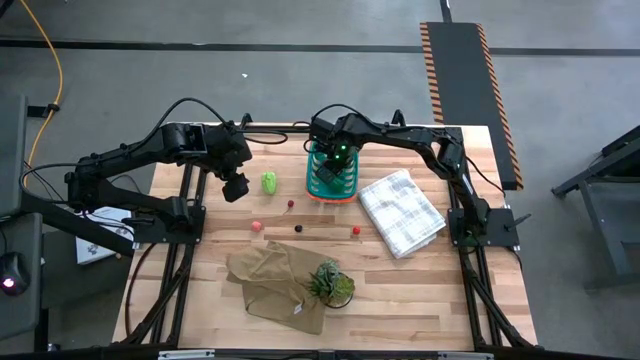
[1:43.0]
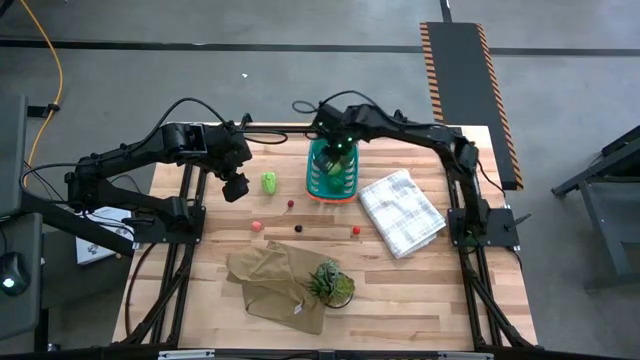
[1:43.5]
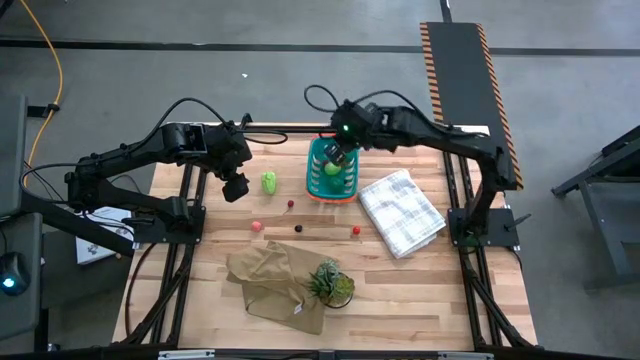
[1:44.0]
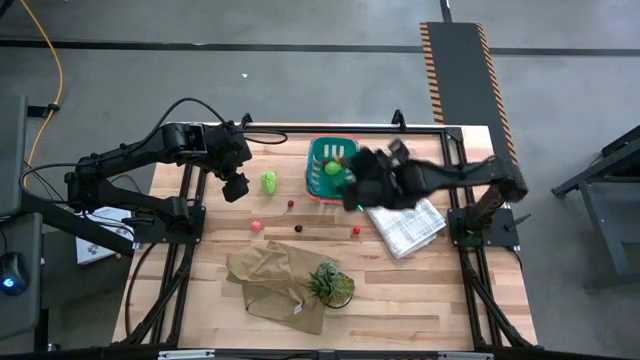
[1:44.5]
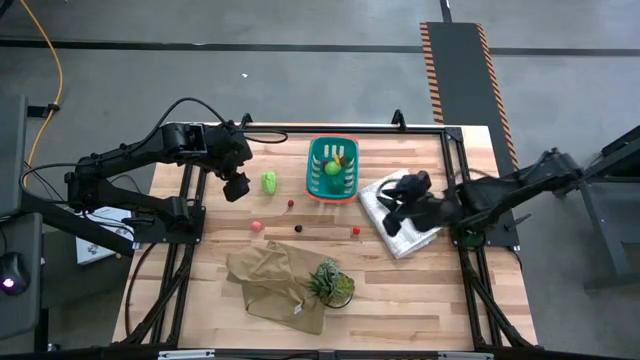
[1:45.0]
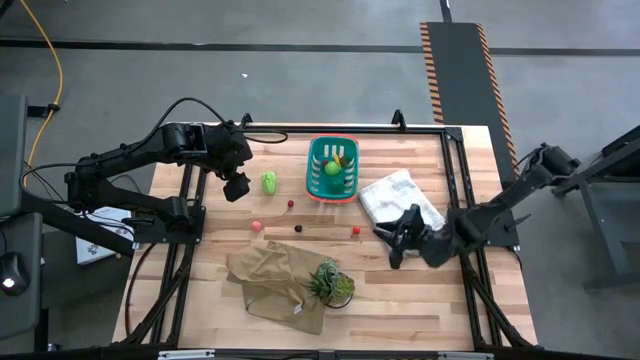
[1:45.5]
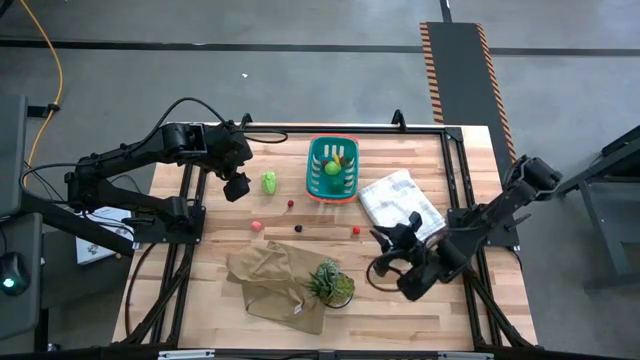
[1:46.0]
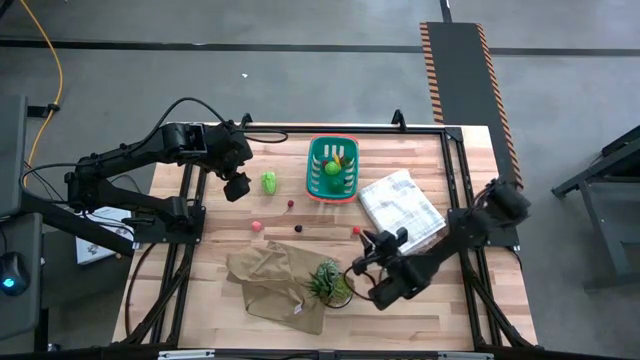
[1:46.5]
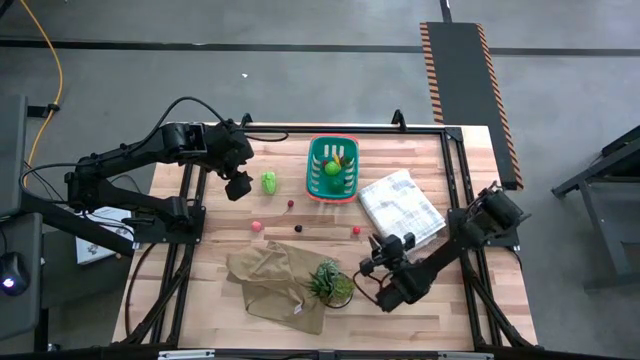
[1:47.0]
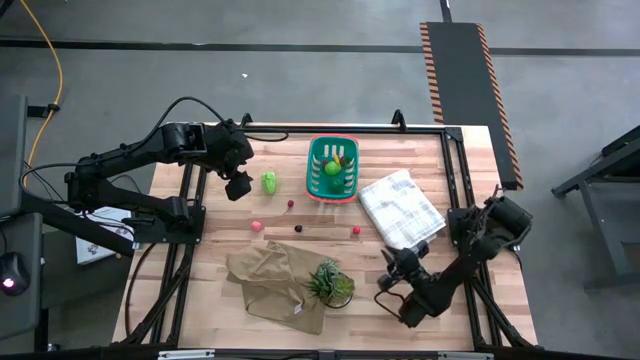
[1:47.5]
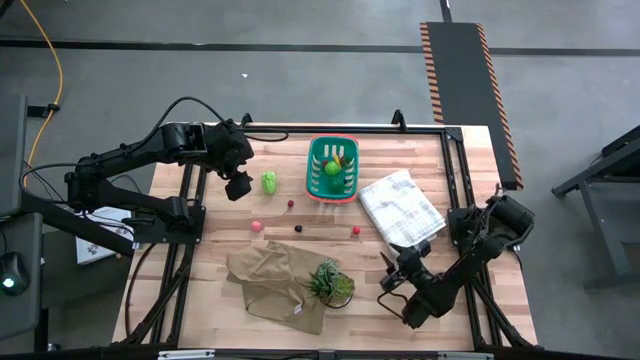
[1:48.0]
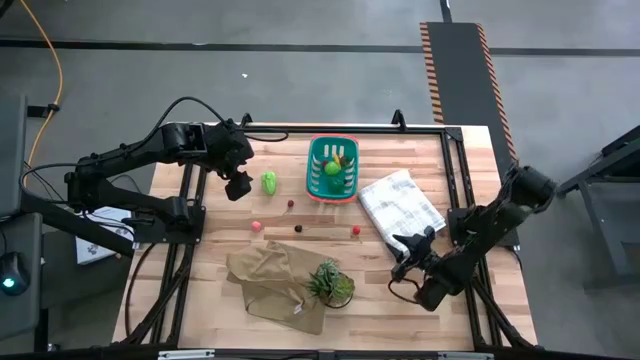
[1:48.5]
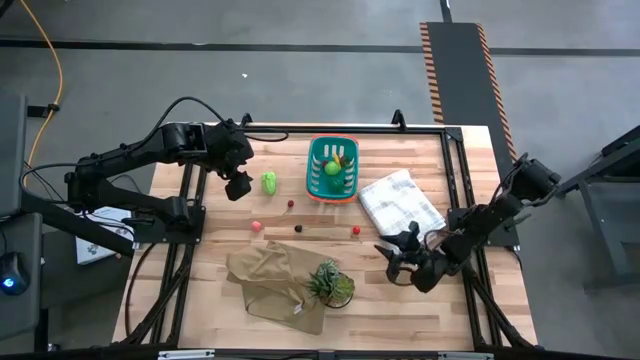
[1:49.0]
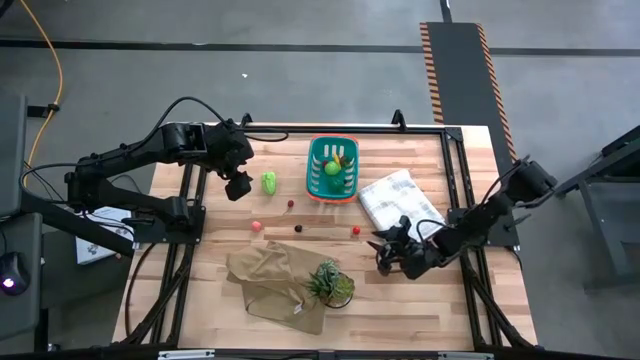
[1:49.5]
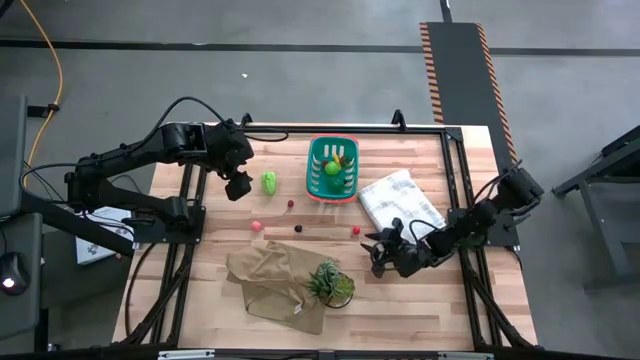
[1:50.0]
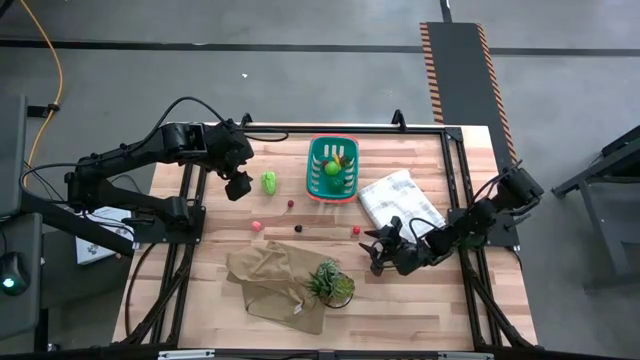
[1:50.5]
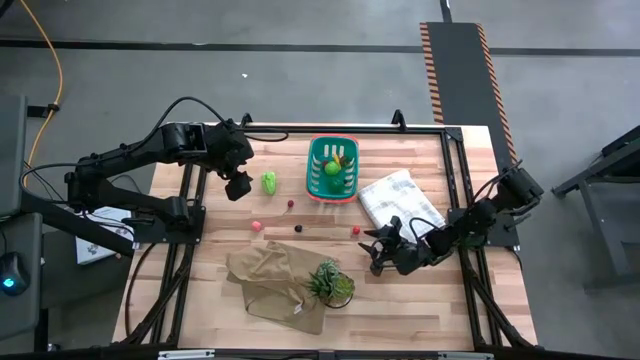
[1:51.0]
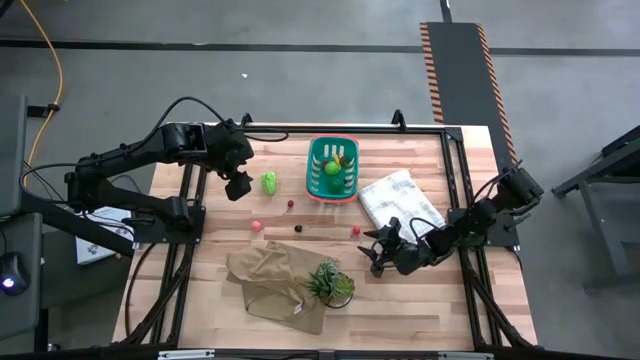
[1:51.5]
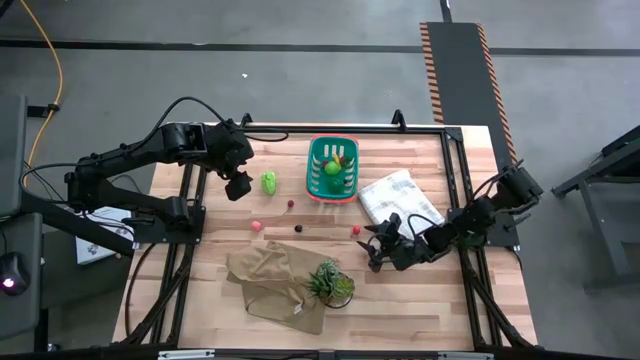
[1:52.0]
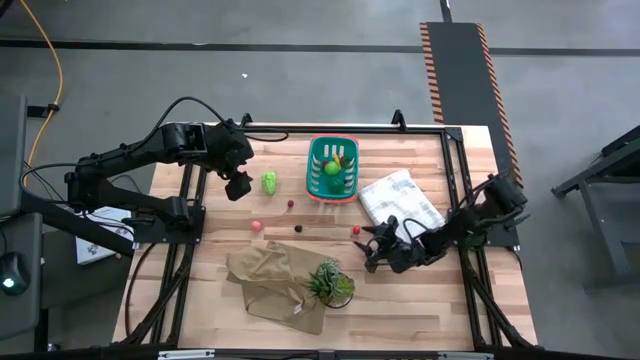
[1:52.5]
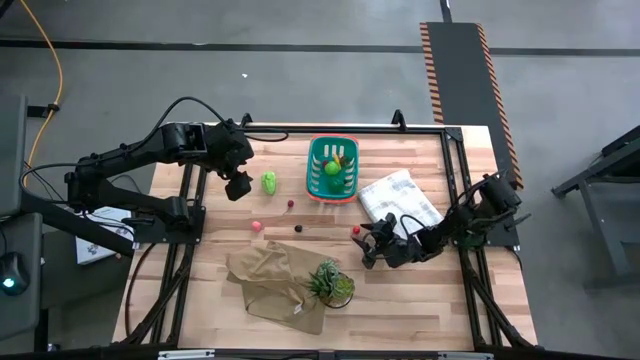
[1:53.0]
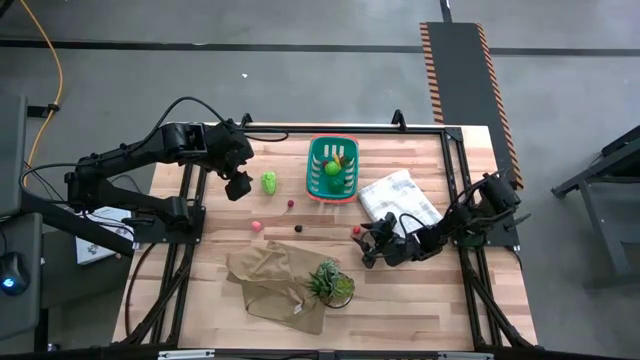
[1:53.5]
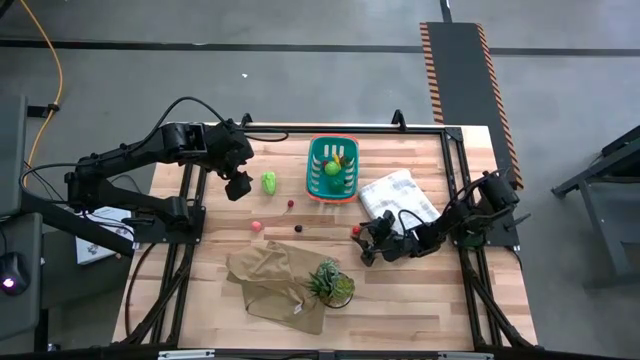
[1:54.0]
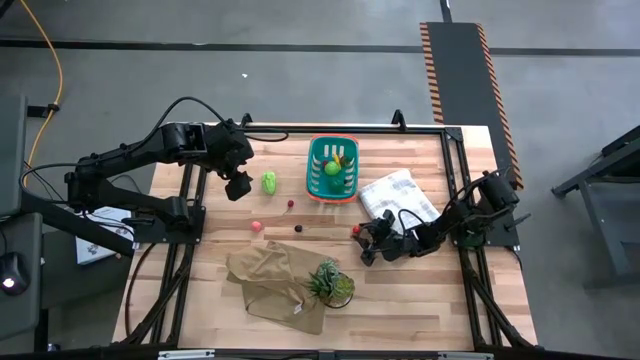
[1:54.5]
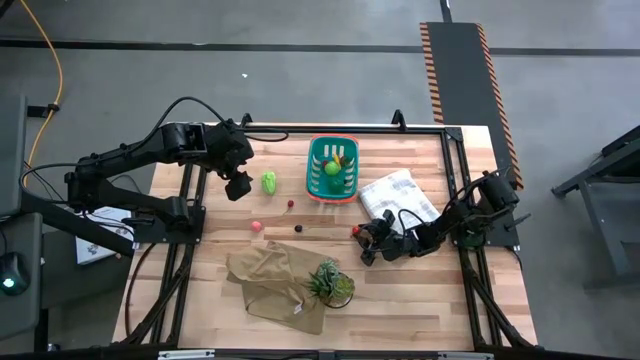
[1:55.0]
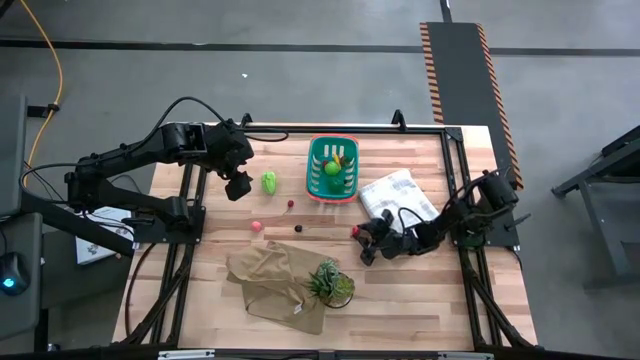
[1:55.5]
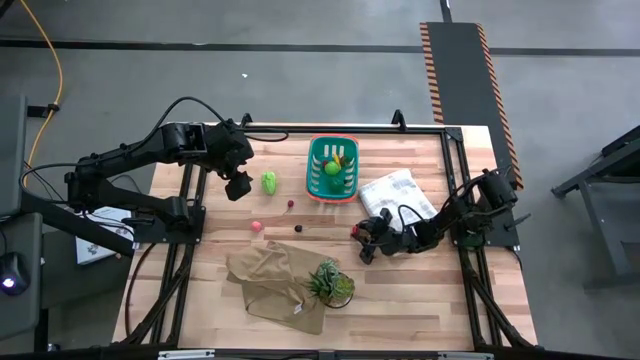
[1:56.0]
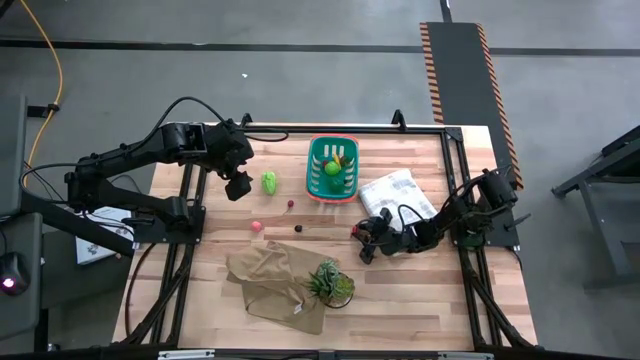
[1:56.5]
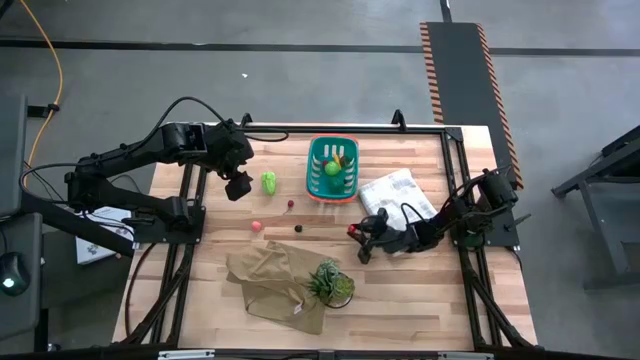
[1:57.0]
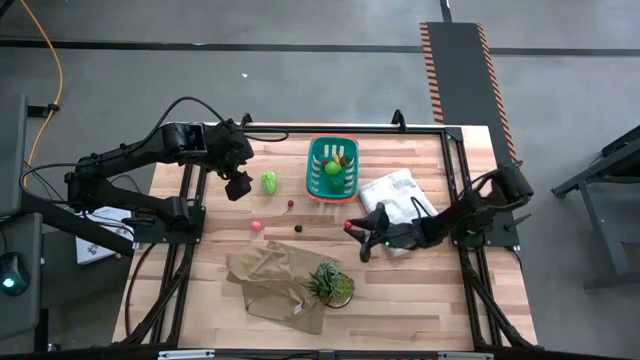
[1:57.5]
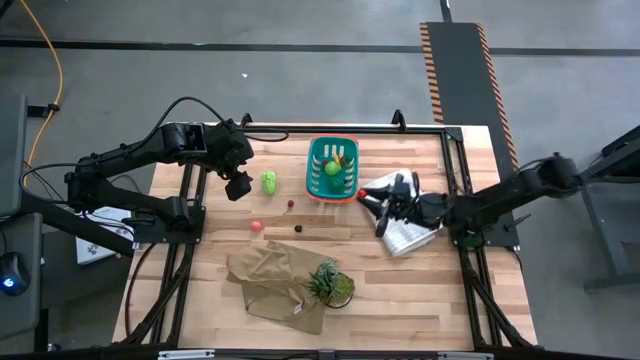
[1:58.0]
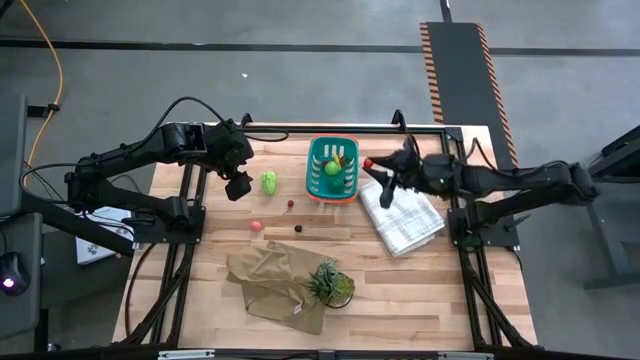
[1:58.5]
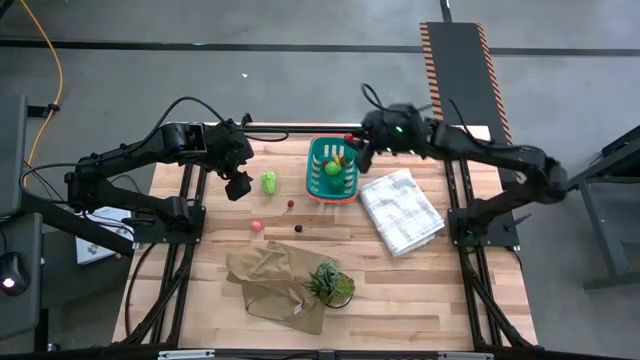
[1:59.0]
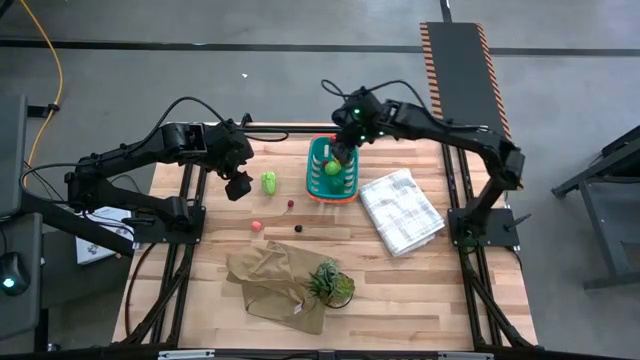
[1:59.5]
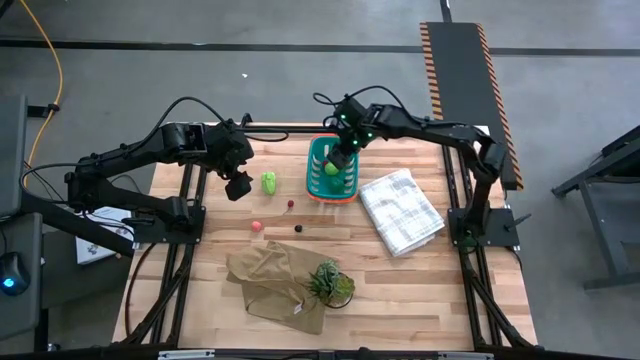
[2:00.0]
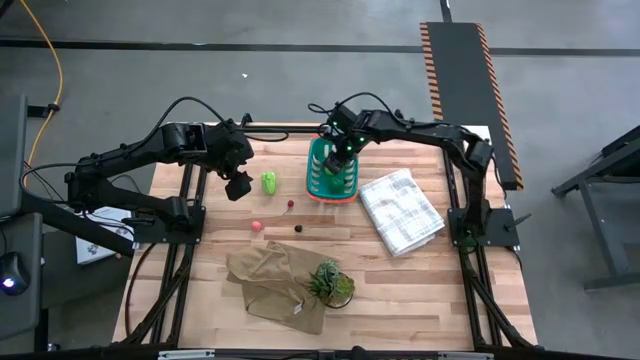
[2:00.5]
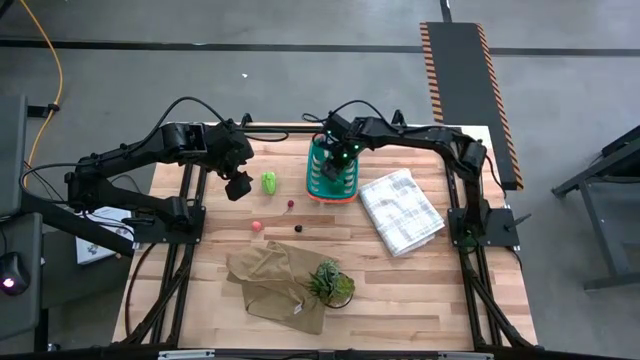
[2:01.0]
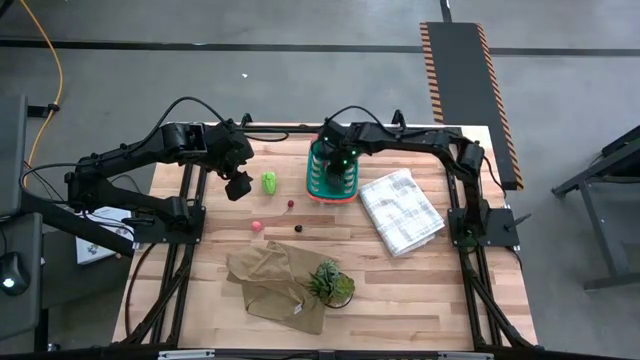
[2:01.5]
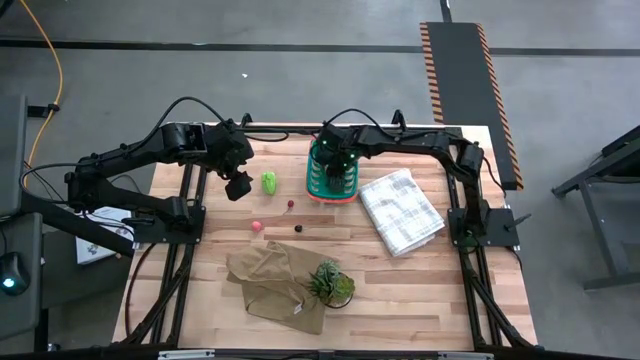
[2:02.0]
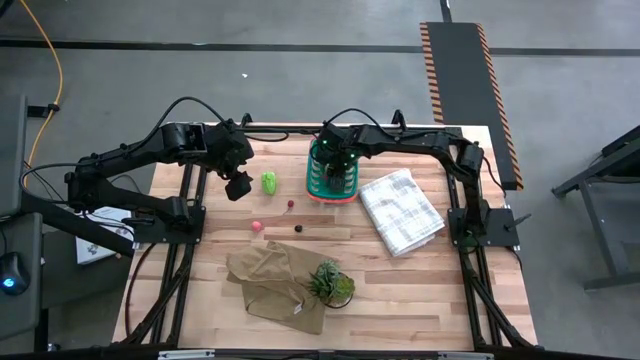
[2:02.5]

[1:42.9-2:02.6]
Task: Pick and placing Produce into tupperware
Put the red cherry into the green basket

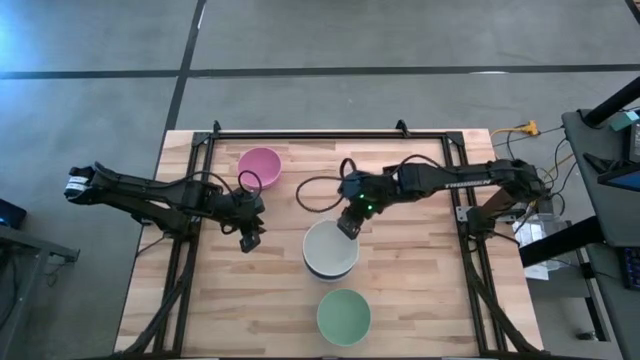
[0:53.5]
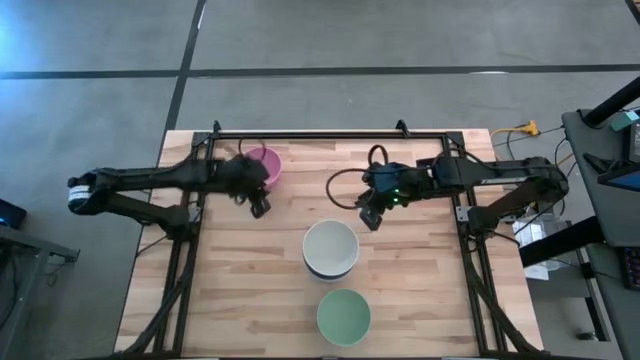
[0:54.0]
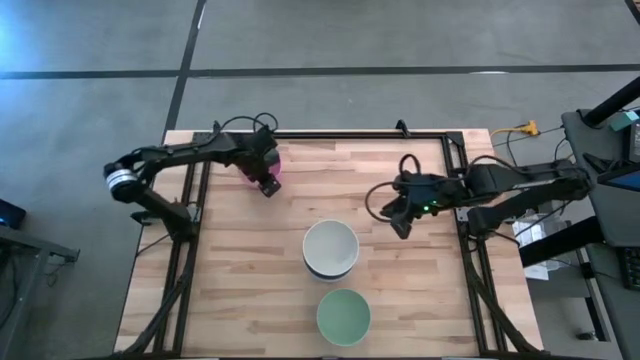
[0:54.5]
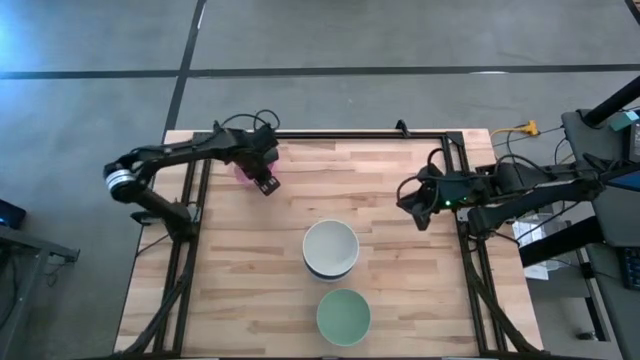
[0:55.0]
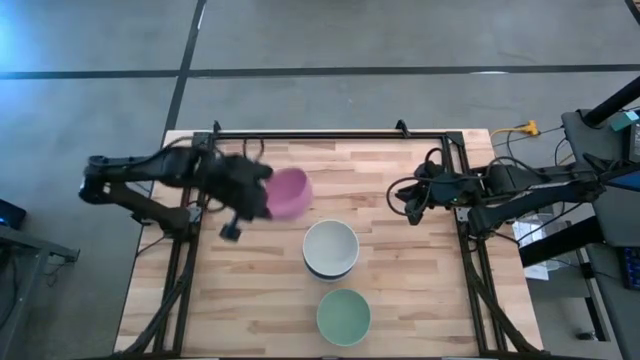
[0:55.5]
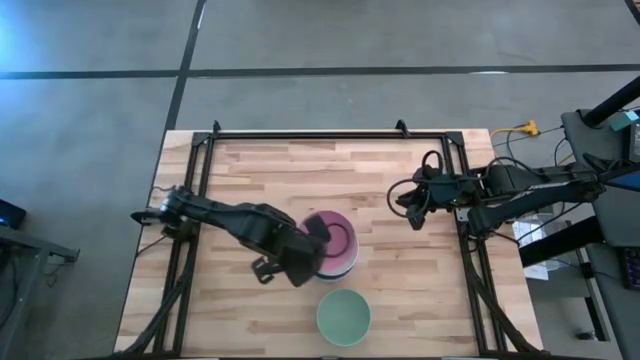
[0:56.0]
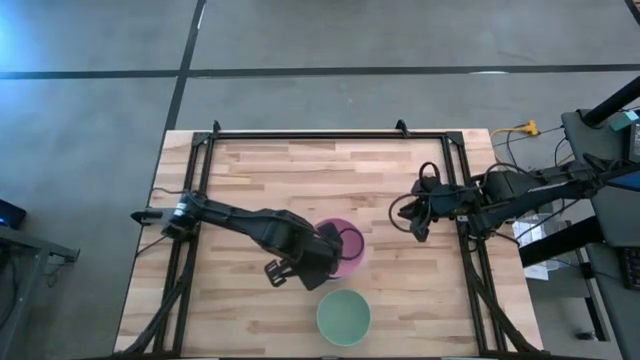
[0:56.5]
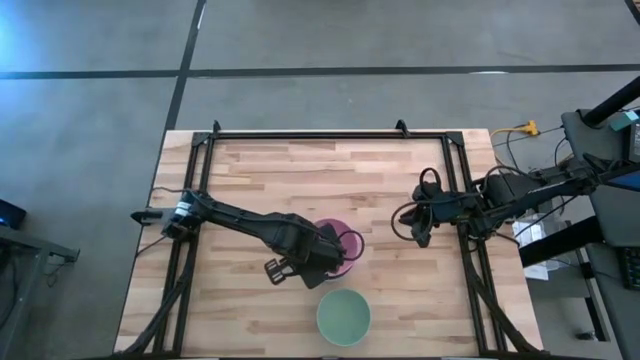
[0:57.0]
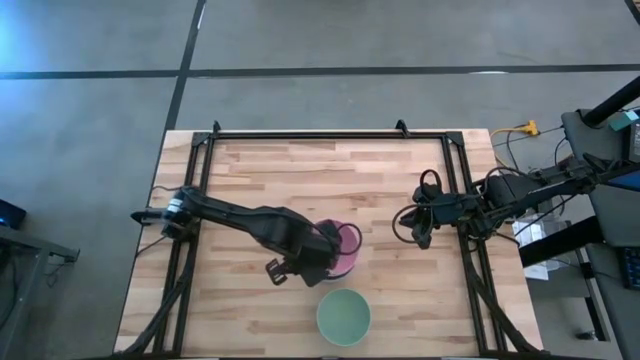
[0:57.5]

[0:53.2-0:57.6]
Task: Nest bowls inside each other
Stack the pink bowl on top of the white bowl
